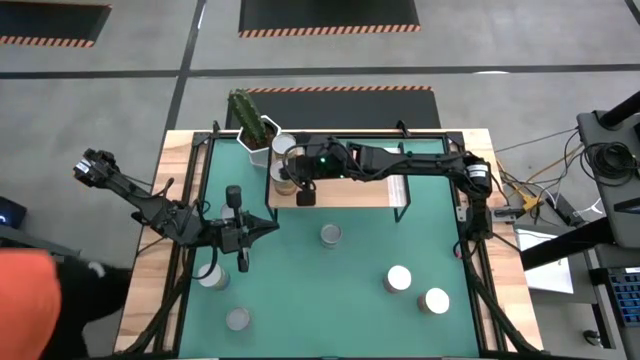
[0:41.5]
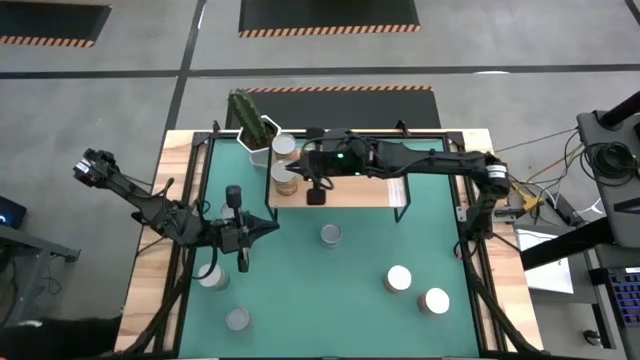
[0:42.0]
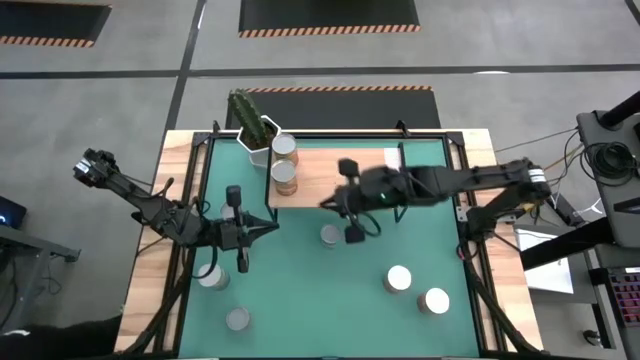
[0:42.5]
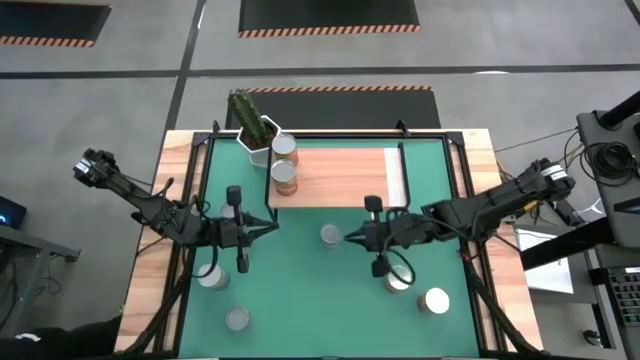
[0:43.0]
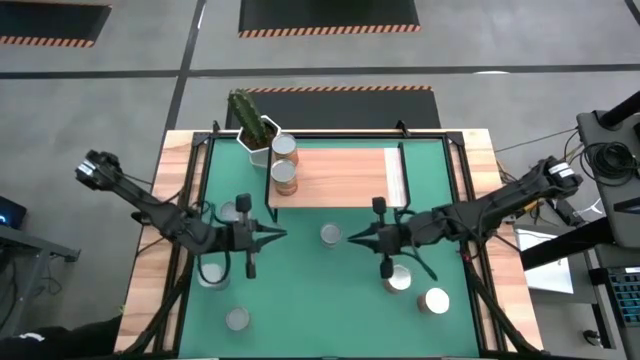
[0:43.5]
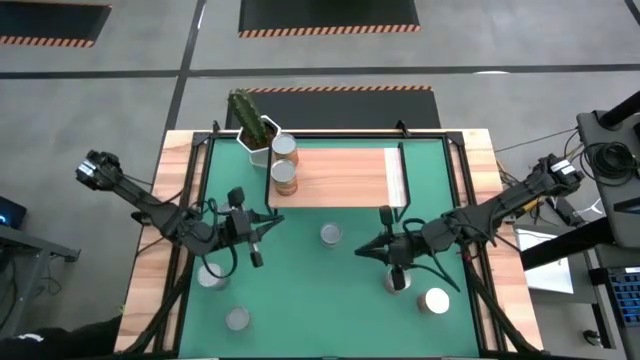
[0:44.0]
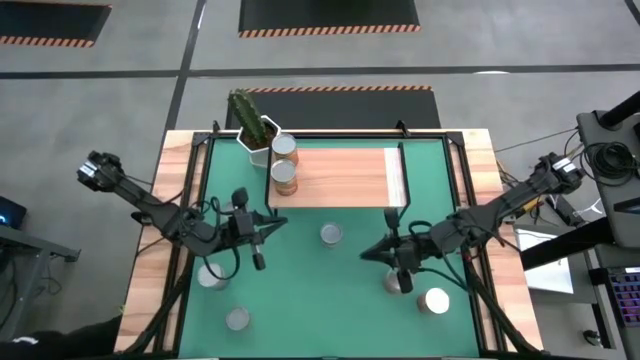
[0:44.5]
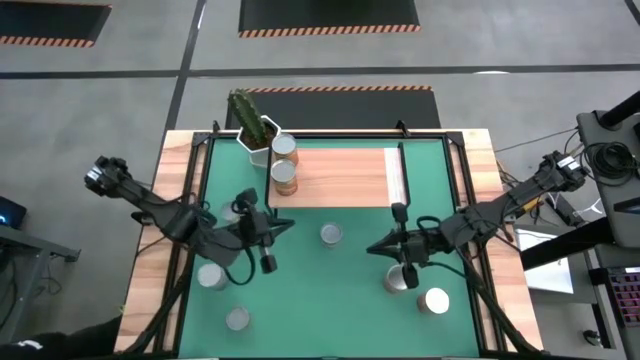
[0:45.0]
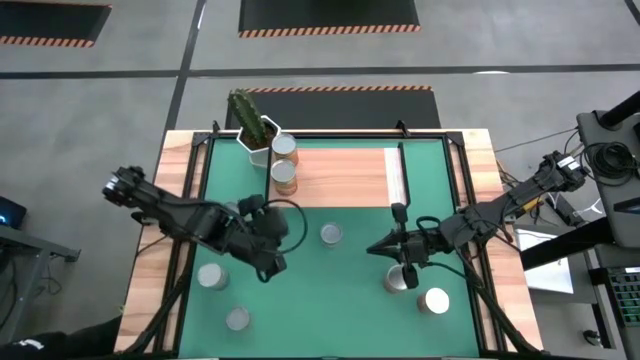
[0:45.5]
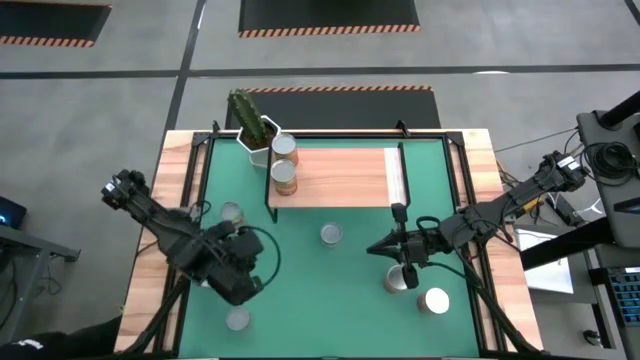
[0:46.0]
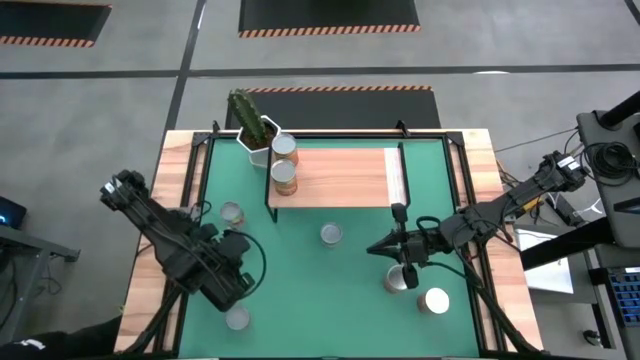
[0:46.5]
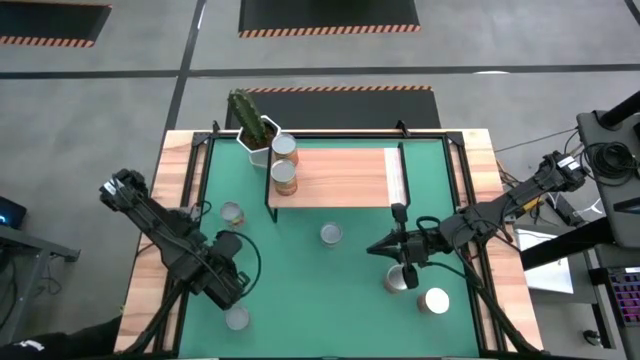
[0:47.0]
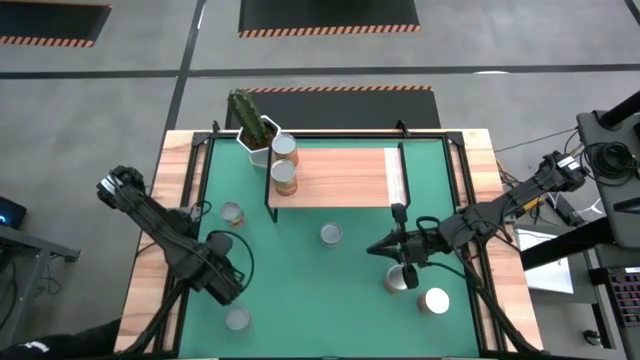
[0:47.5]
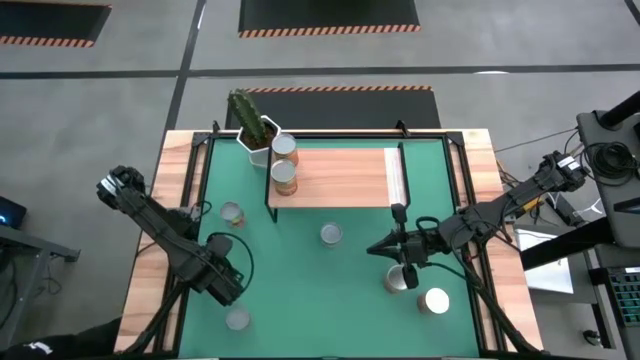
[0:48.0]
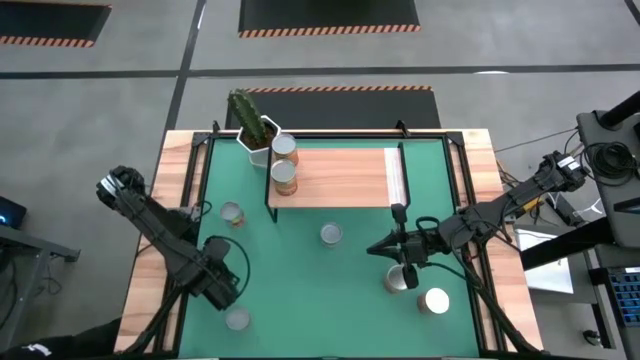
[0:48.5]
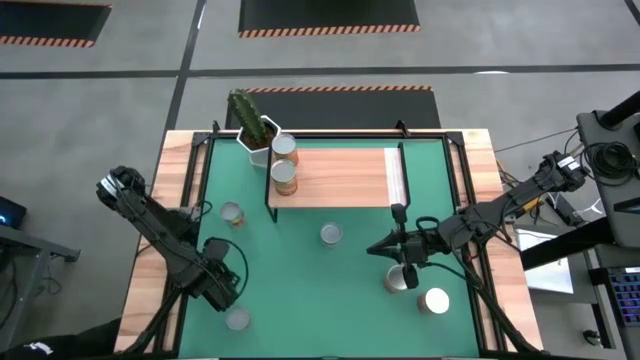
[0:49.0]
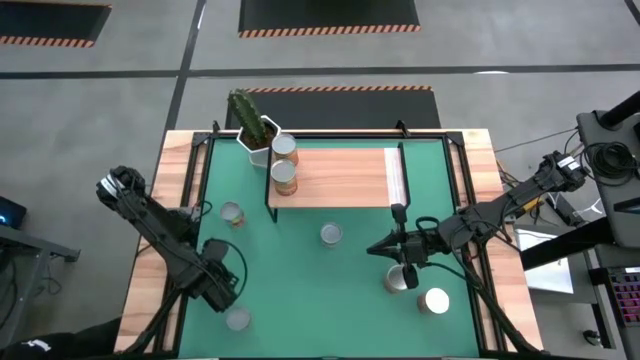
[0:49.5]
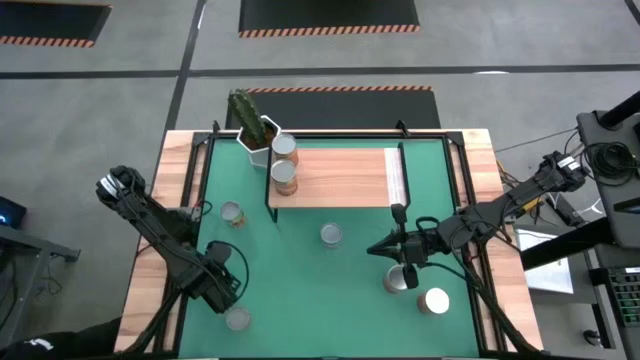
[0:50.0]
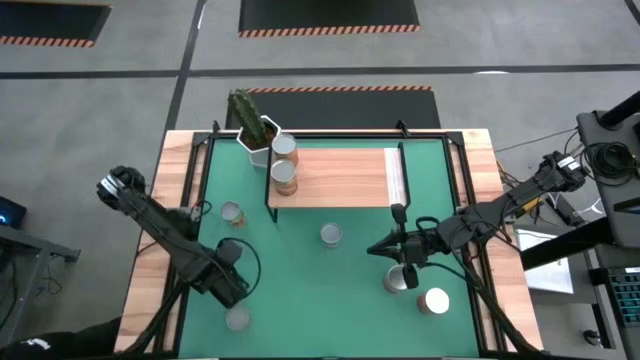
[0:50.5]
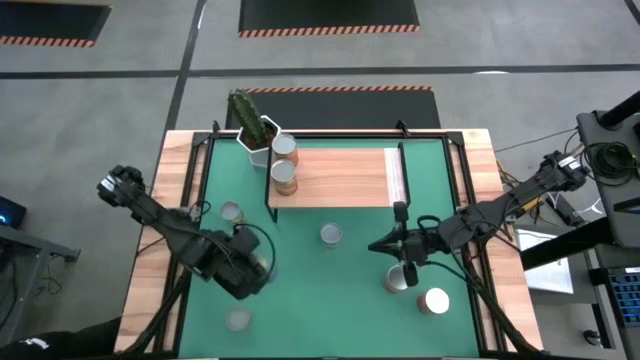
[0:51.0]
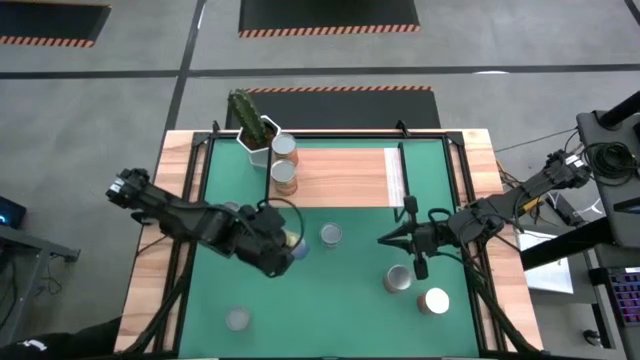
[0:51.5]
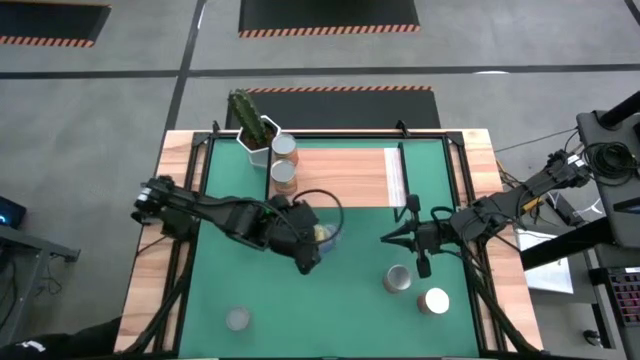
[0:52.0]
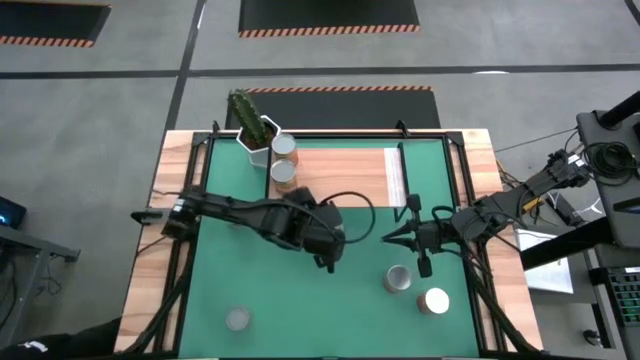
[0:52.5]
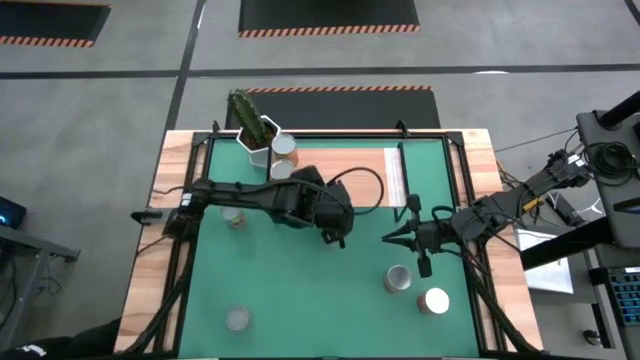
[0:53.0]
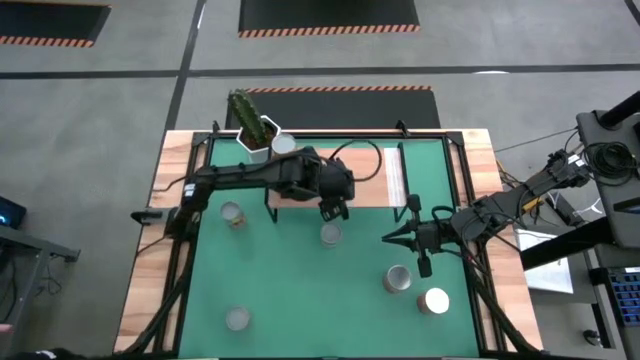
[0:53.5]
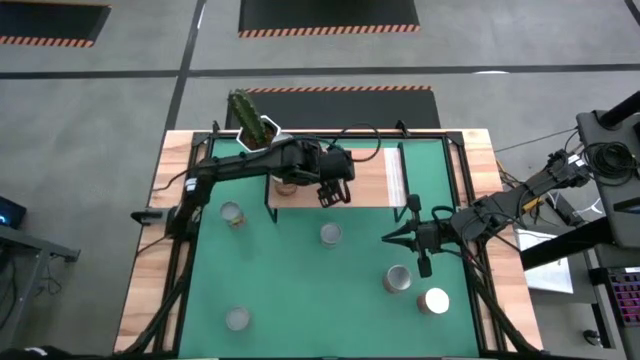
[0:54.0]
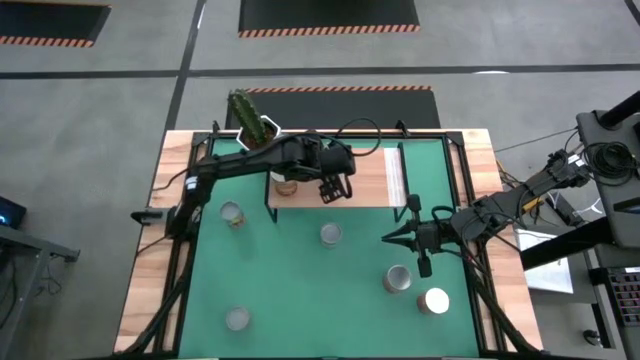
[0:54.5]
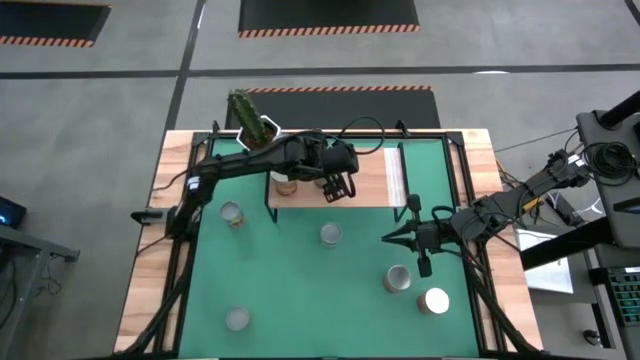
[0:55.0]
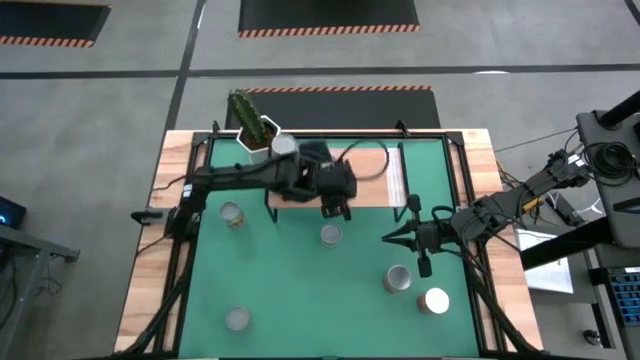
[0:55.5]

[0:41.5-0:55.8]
Task: Pick and place cans onto a shelf
Put the canned peas on the shelf

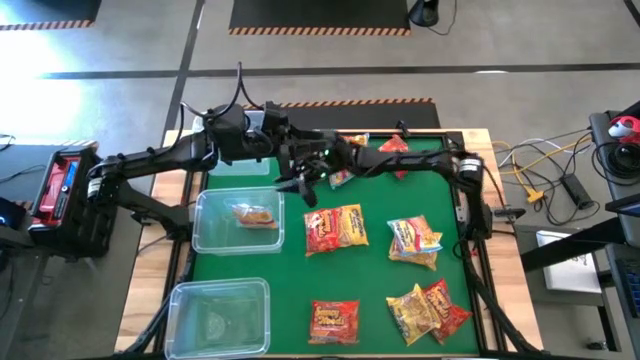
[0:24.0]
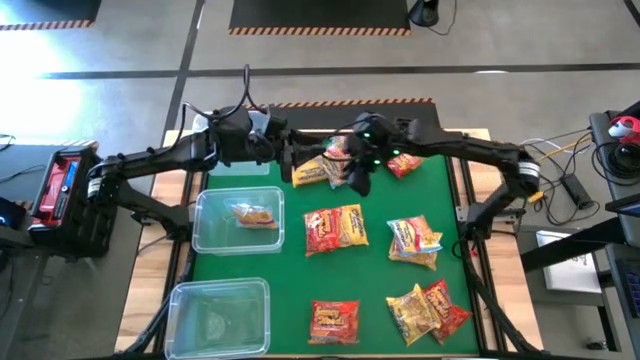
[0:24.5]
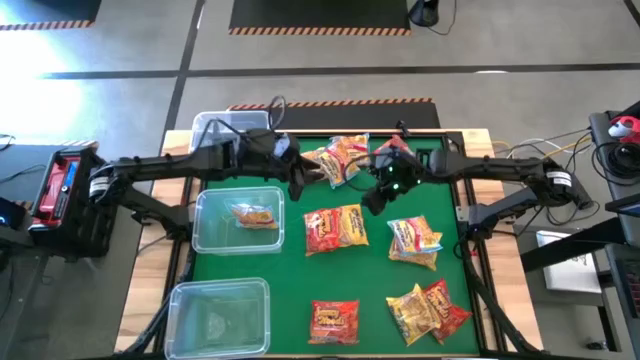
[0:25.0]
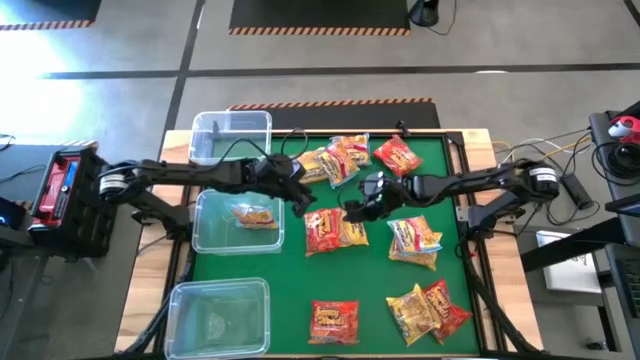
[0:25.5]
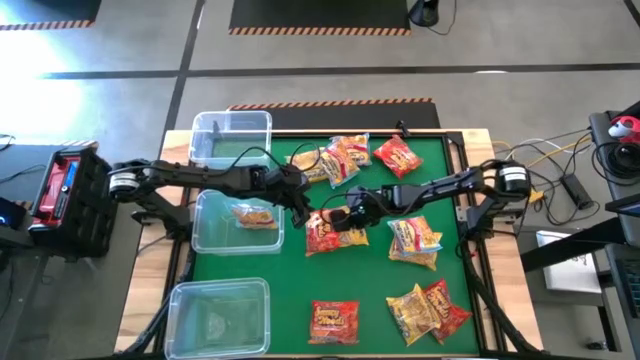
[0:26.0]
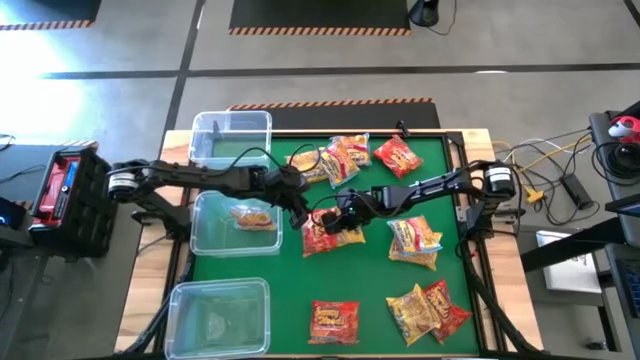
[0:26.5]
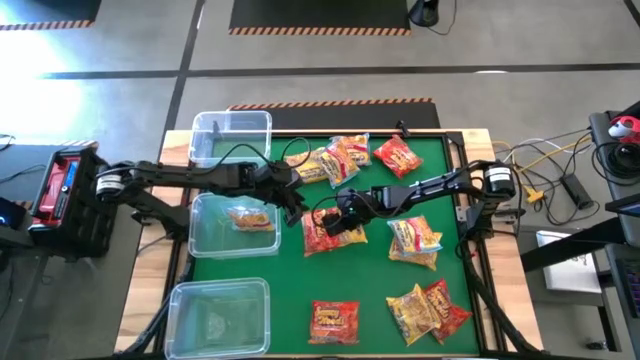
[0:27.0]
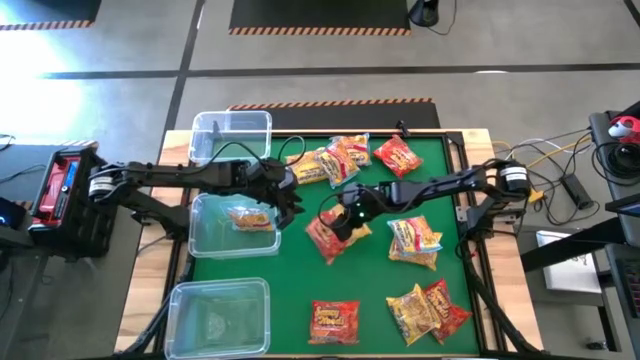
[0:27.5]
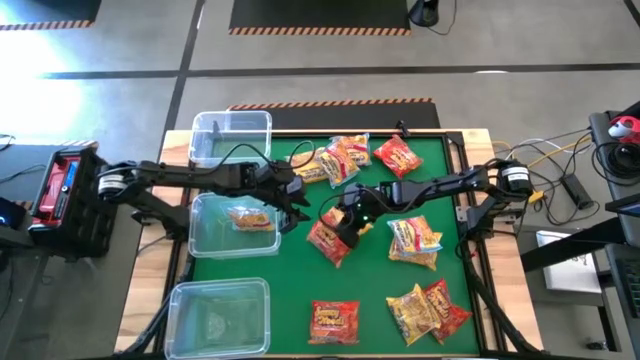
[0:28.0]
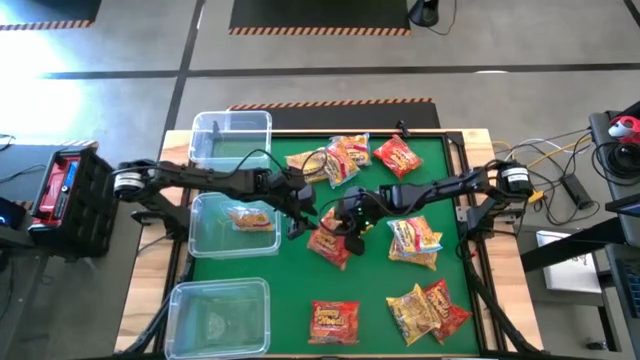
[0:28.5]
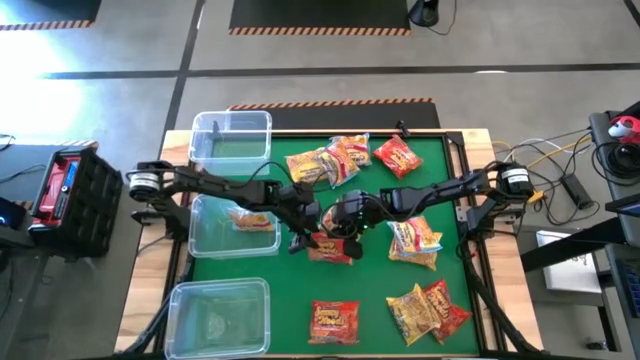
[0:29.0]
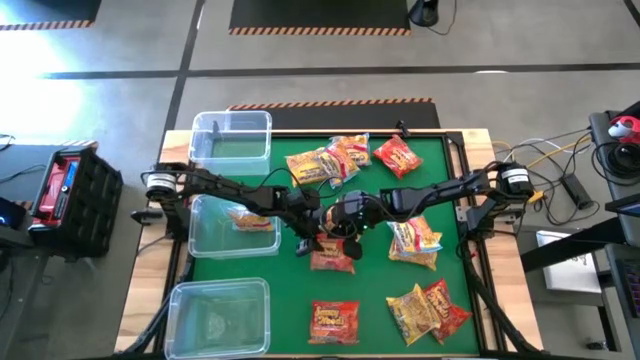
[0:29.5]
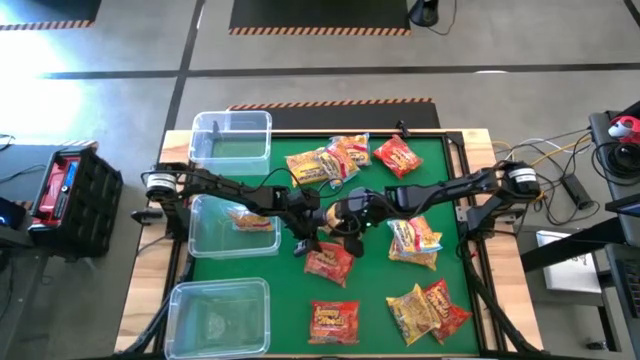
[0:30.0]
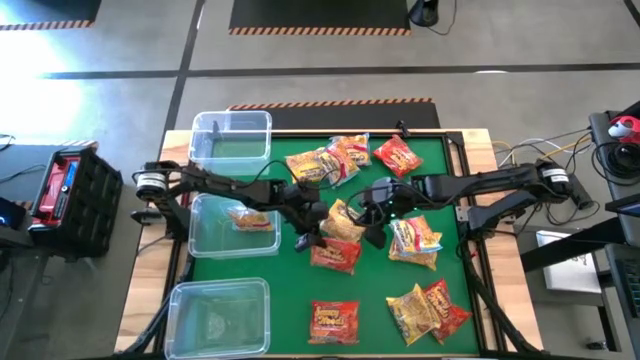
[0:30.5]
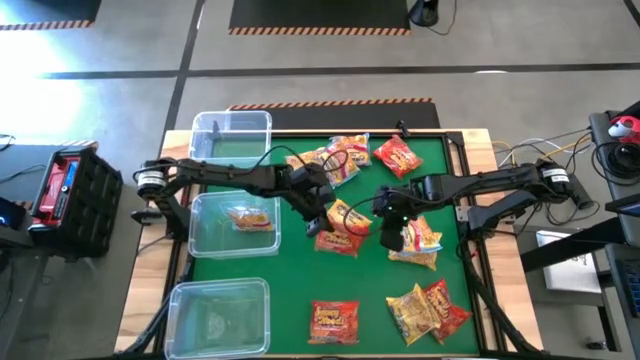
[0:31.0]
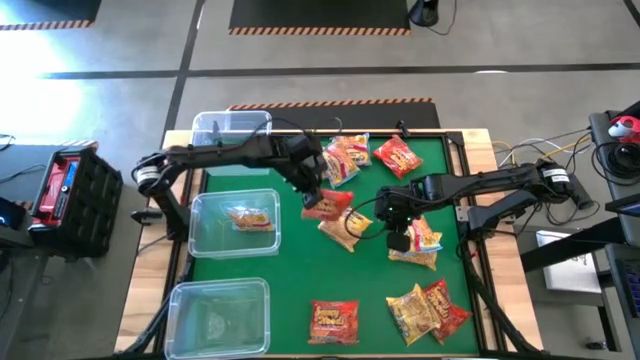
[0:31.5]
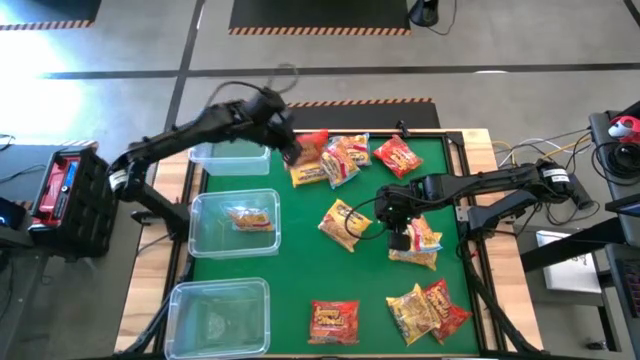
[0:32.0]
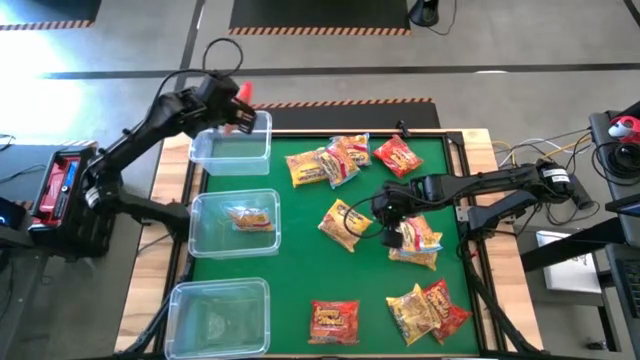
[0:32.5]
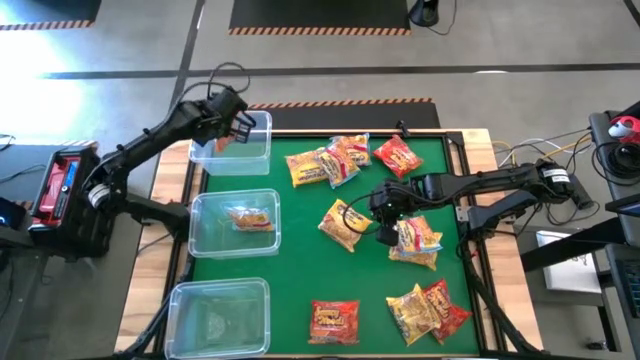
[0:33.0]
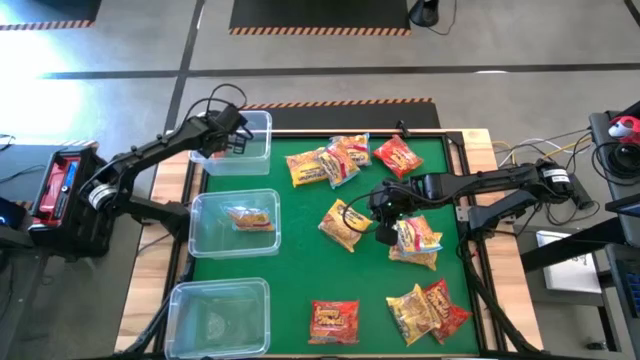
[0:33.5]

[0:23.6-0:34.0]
Task: Sort Maruchan noodles
Put the middle left orange noodle pack into the top transparent bin
